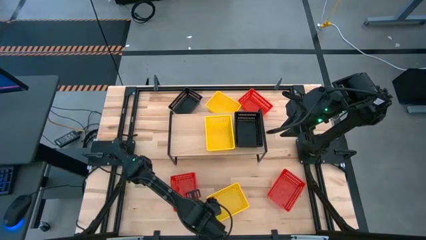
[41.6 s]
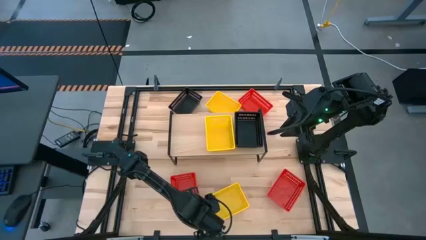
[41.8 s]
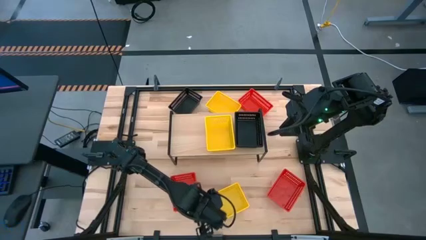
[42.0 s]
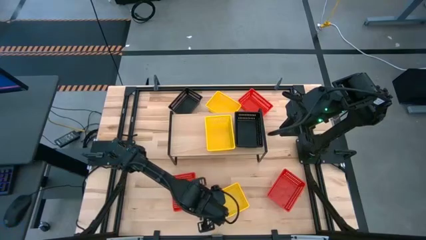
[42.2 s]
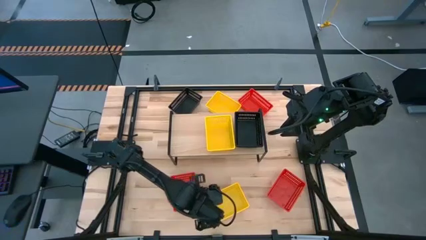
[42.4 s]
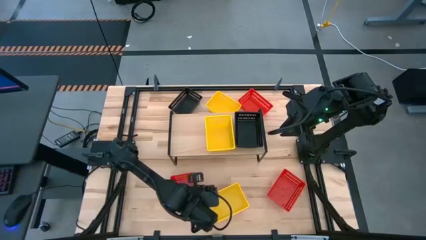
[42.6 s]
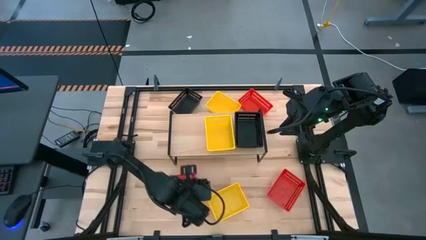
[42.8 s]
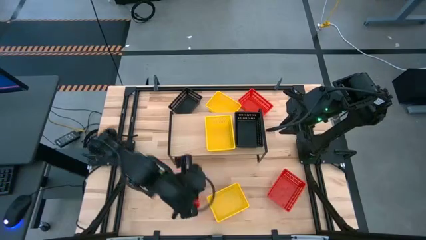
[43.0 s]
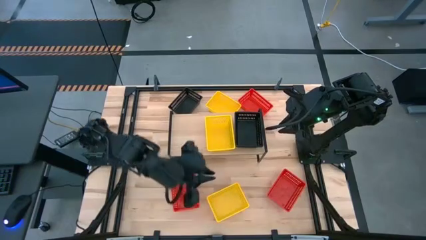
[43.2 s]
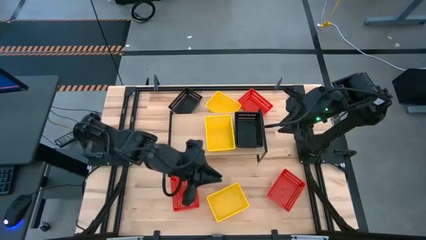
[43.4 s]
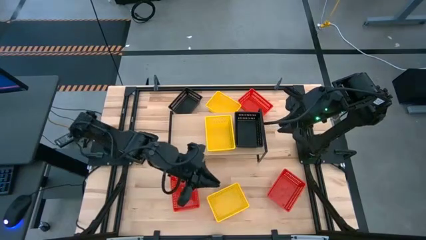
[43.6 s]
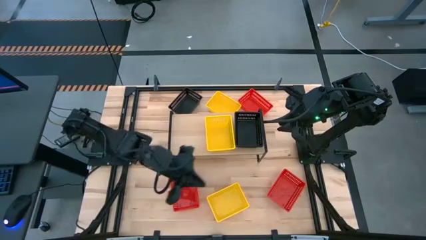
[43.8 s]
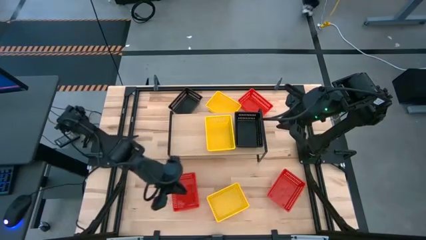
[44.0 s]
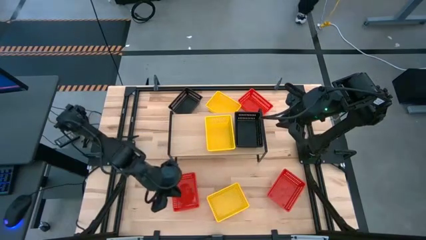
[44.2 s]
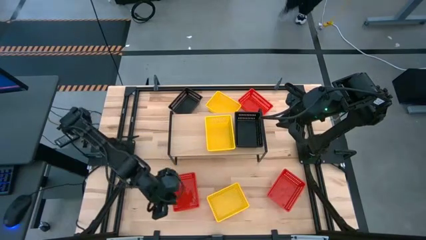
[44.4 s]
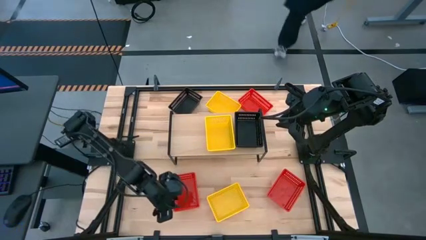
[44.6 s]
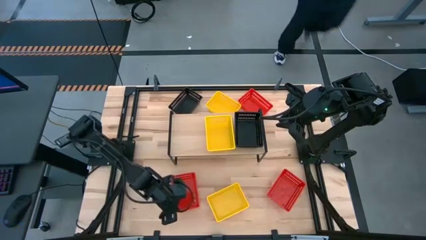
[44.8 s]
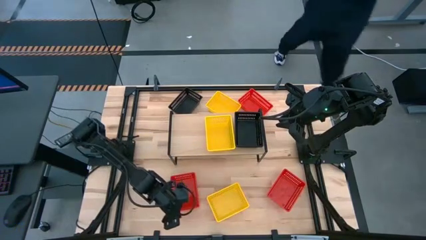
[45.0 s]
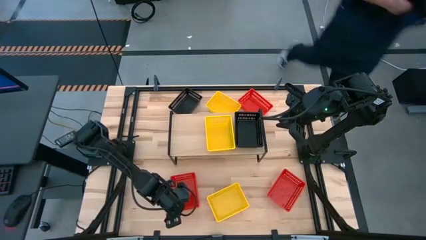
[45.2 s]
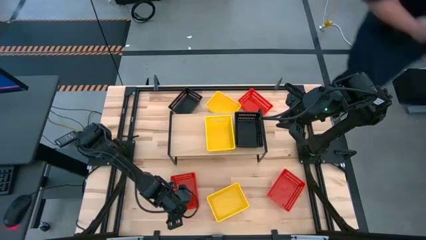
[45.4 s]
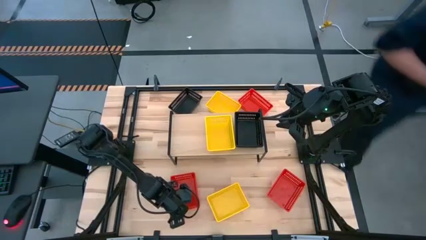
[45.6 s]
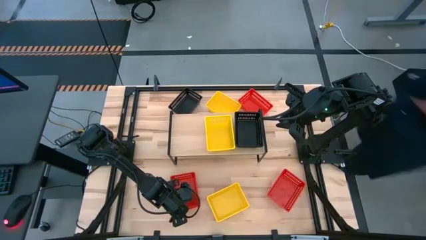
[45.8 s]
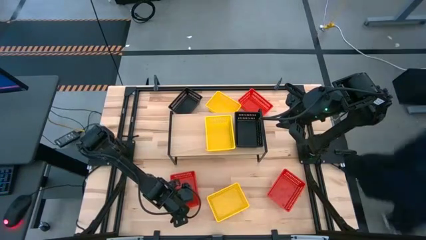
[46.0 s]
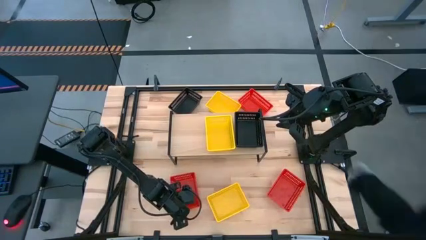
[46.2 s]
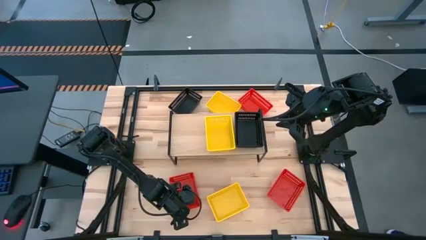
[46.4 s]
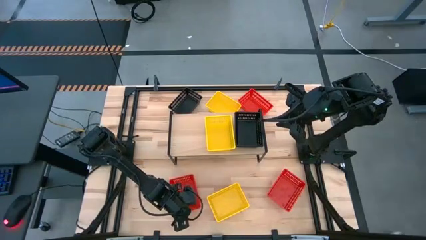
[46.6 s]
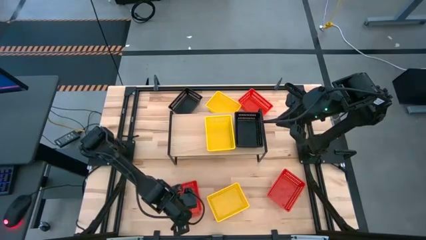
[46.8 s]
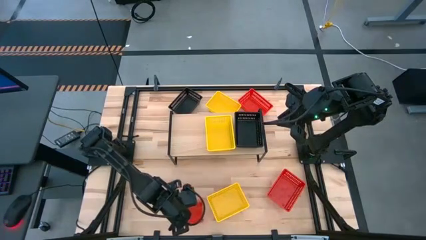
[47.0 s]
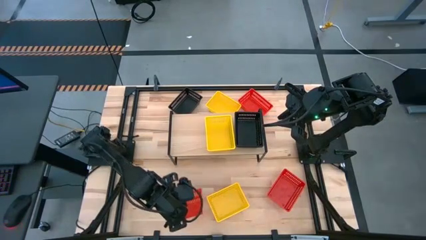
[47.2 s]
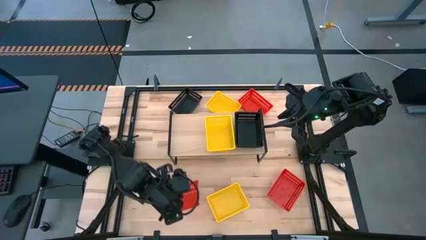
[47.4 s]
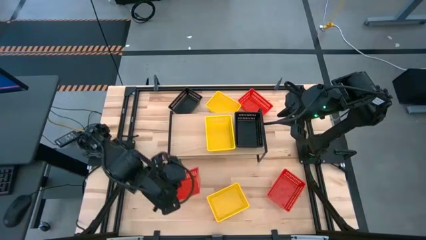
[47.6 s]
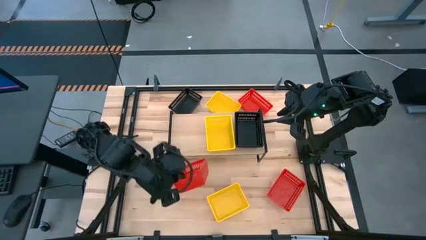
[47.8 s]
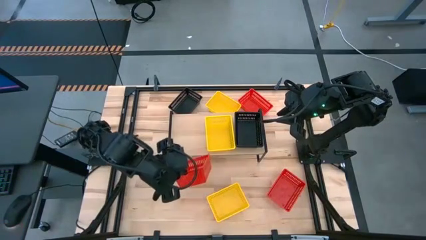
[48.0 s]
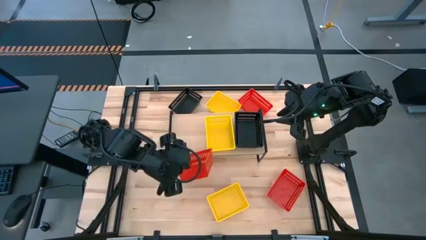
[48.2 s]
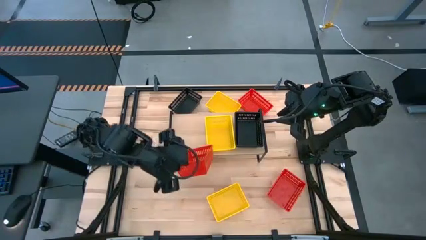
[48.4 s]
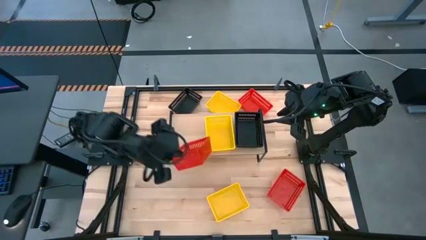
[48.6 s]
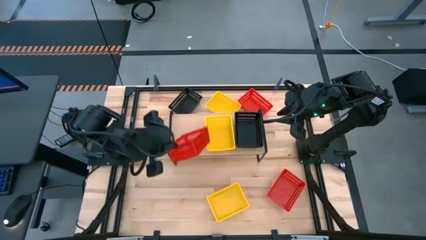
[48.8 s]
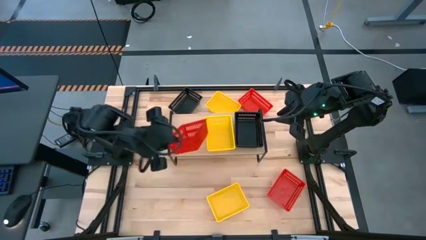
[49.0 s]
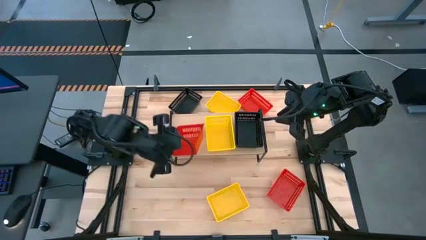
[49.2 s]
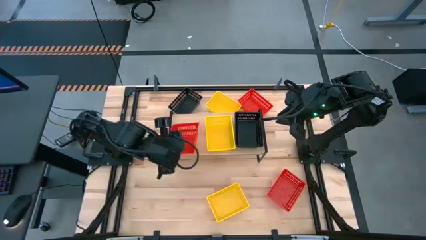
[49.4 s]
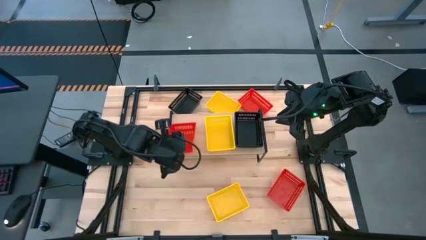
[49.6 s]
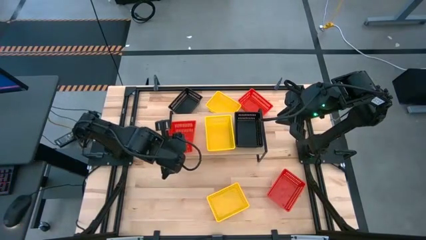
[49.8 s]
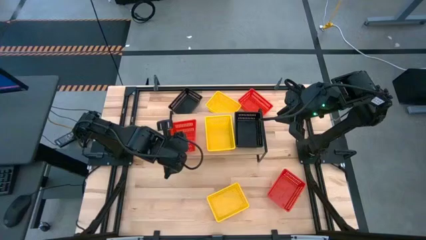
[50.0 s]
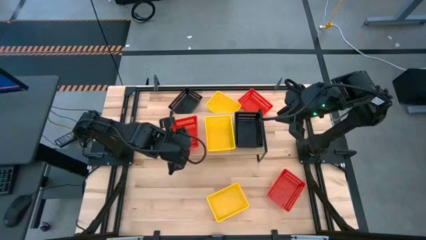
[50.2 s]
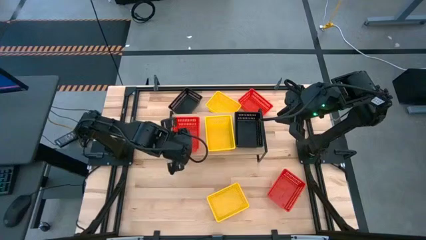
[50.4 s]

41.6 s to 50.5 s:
Task: Stack baskets on shelf by color
Put the bottom left red bin on the shelf

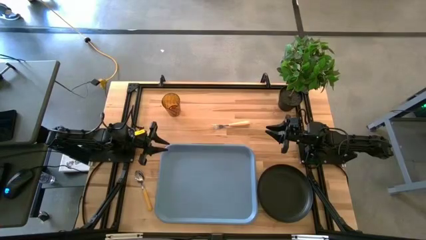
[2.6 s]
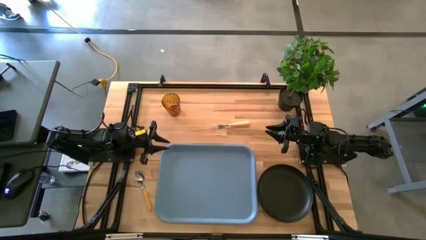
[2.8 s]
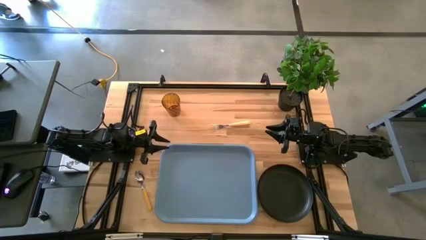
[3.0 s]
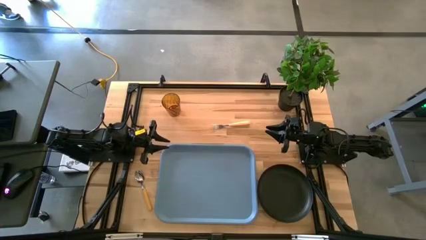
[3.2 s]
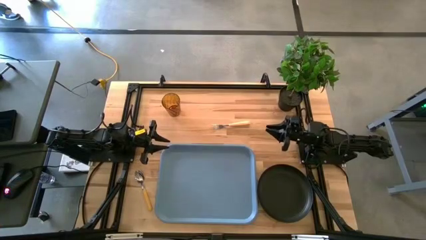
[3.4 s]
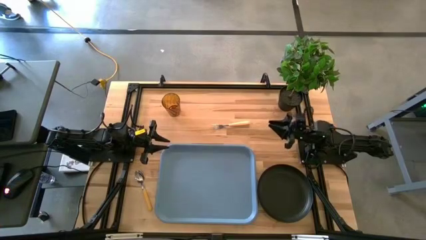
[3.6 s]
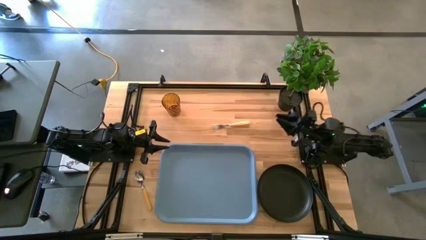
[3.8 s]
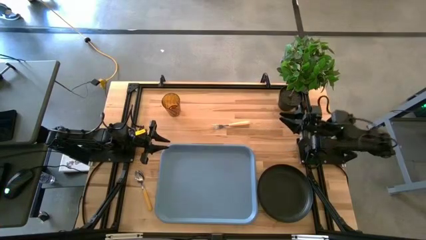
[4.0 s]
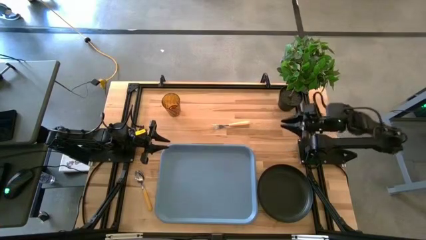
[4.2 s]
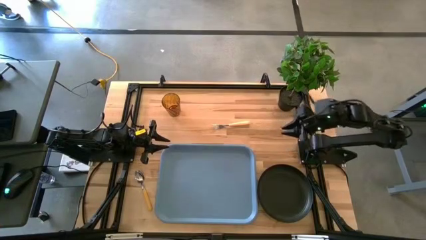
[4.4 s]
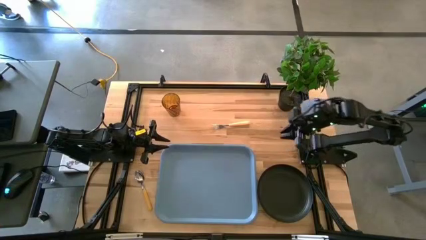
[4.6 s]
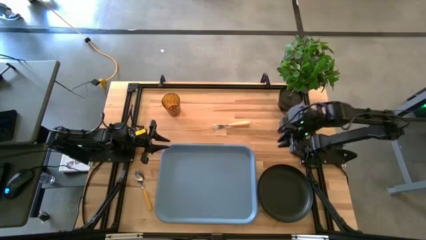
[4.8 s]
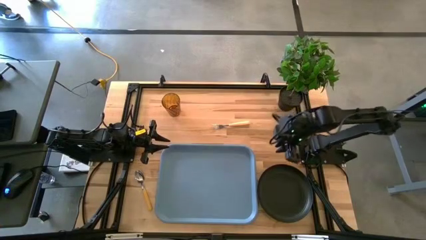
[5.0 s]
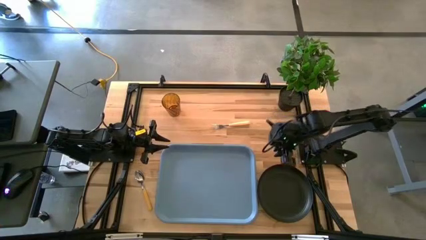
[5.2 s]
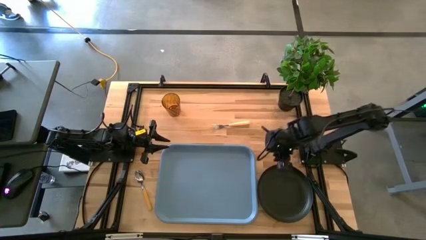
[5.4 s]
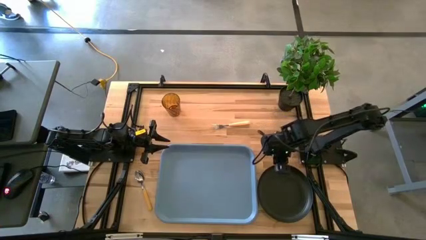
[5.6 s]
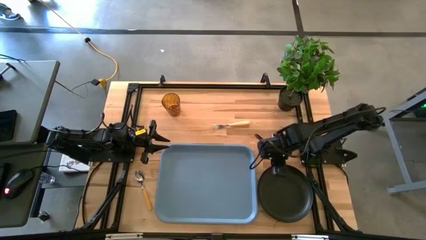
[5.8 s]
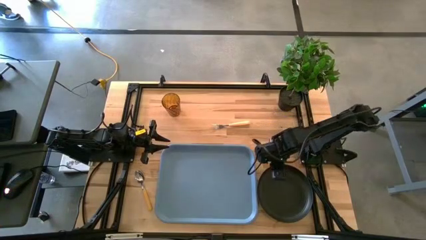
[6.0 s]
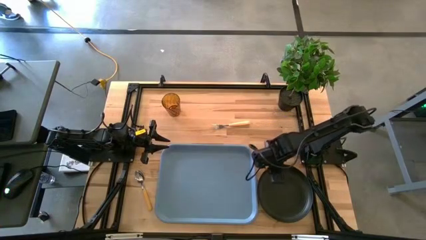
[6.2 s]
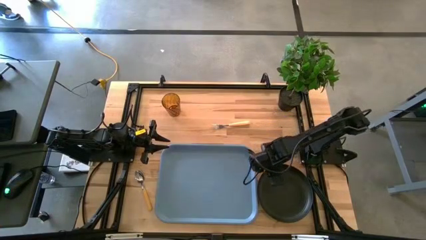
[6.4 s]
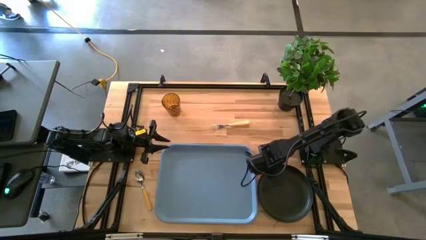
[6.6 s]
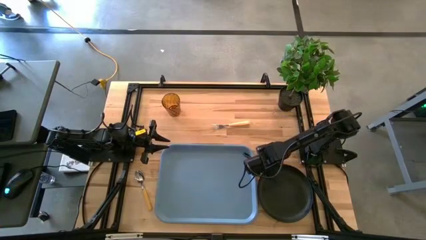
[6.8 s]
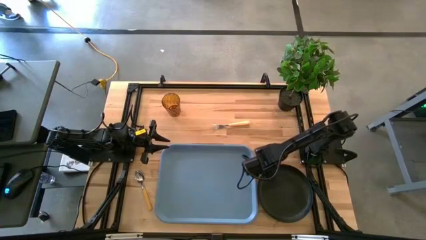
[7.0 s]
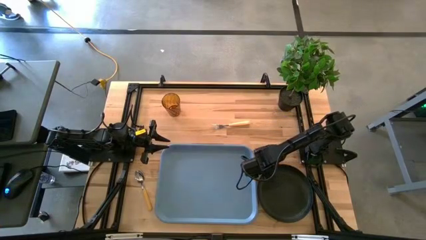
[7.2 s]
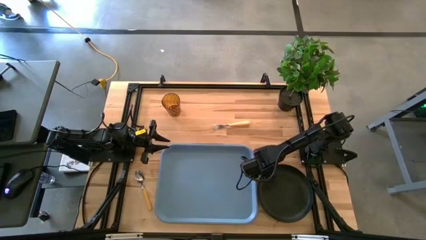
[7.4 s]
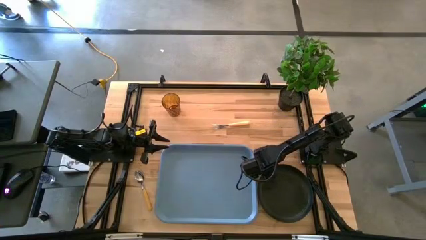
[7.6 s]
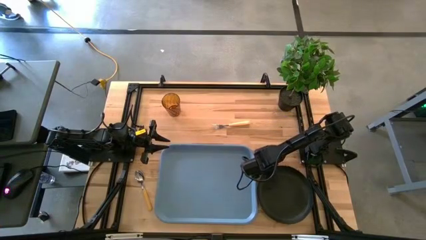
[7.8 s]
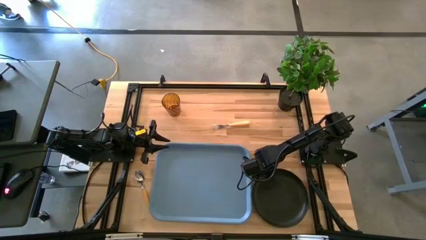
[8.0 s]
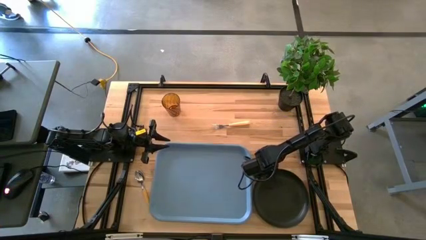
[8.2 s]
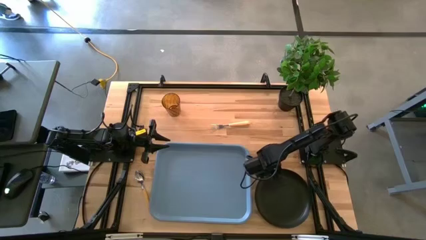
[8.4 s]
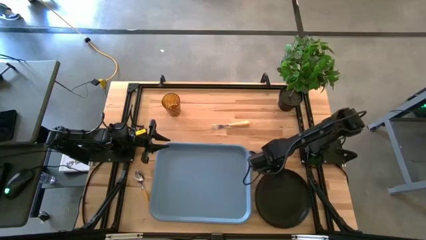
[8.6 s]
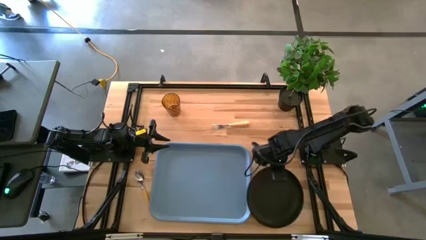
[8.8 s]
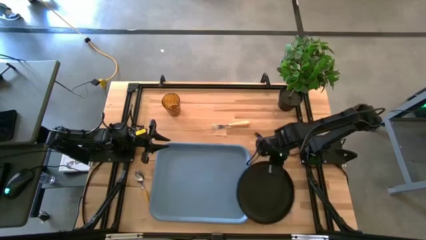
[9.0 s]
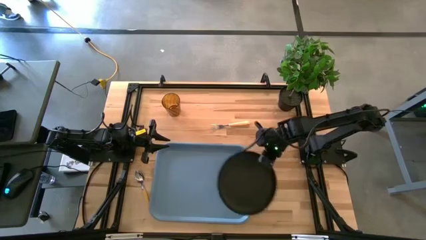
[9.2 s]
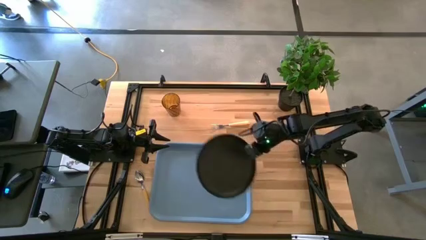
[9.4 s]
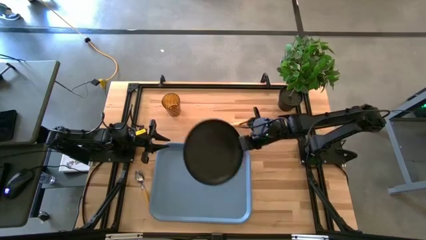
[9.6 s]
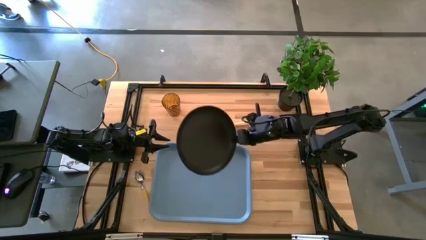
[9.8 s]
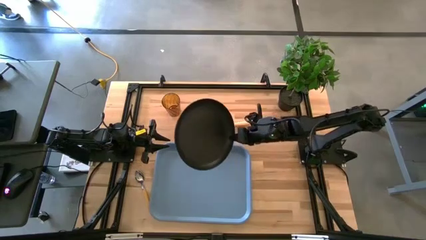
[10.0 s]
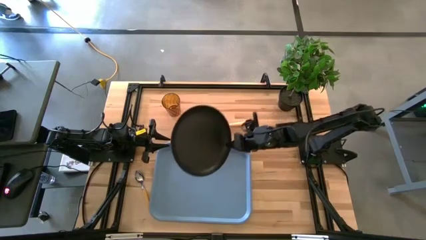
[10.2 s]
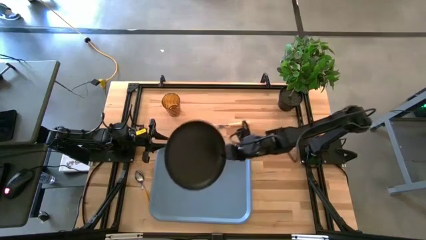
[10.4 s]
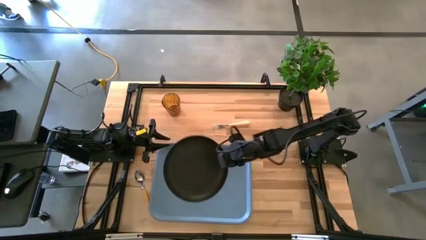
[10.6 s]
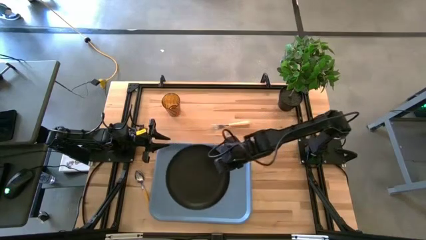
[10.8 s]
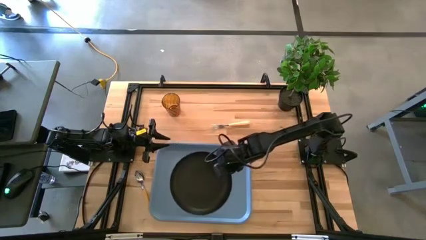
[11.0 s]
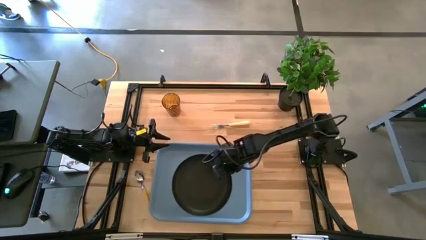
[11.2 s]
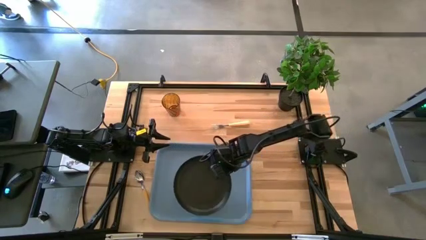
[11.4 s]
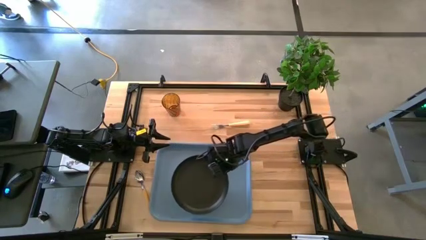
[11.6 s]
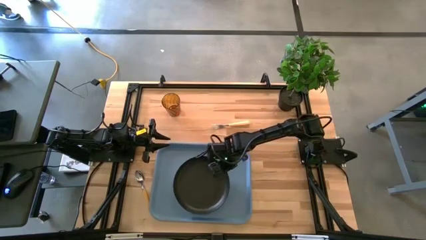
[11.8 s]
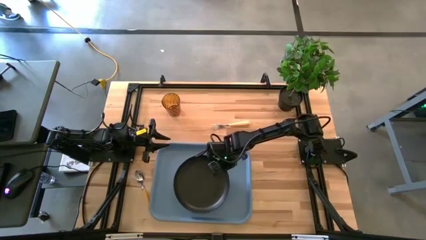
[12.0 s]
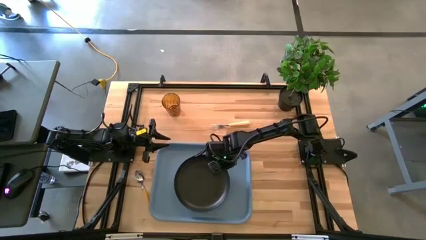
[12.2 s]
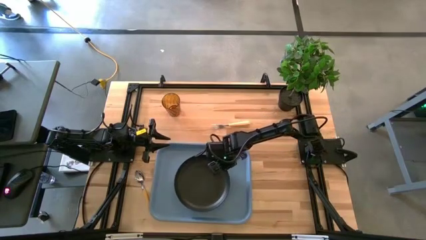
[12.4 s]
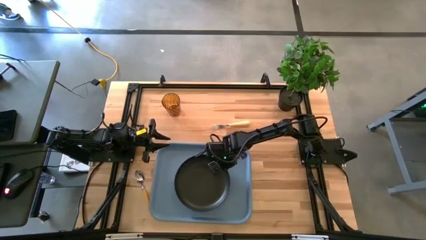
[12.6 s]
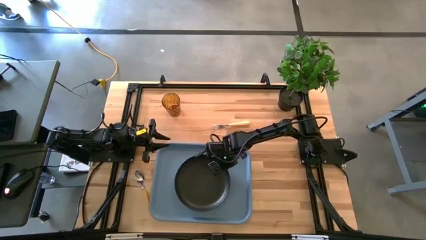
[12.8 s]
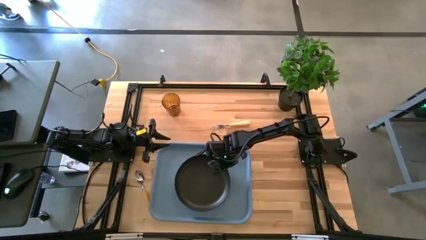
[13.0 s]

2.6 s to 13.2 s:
Task: Pick and place plate/cup/fork/spoon on tray
Put the black plate on the blue serving tray
